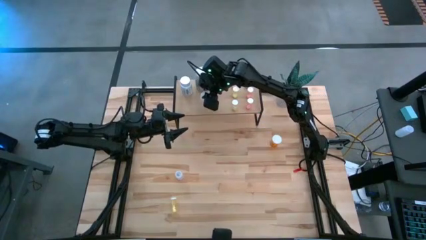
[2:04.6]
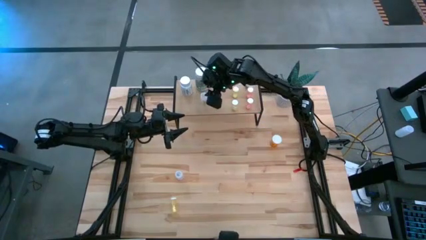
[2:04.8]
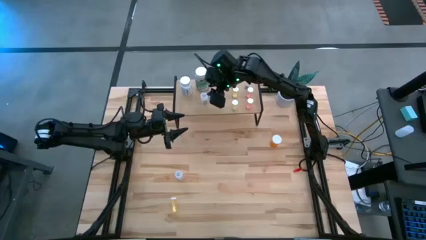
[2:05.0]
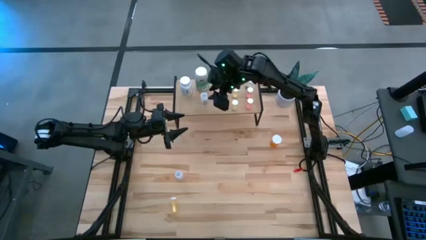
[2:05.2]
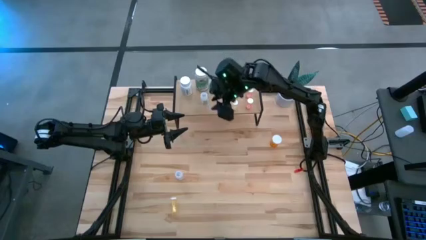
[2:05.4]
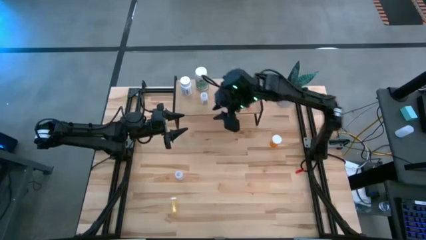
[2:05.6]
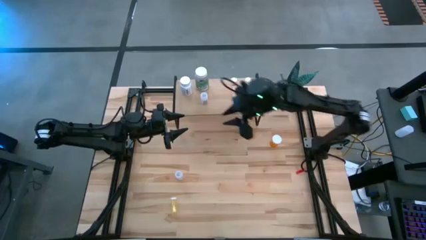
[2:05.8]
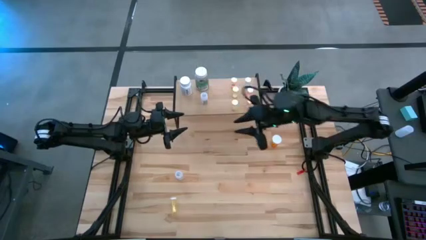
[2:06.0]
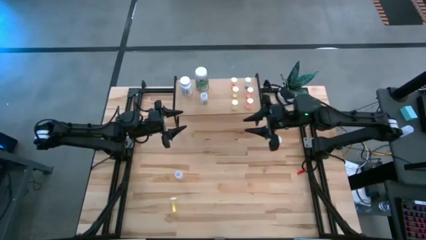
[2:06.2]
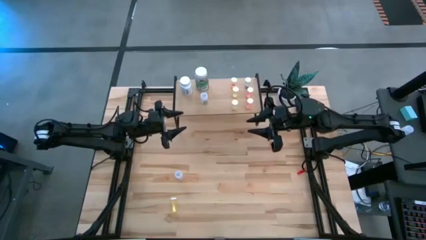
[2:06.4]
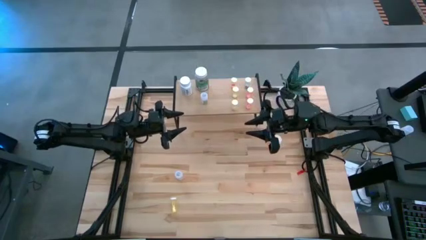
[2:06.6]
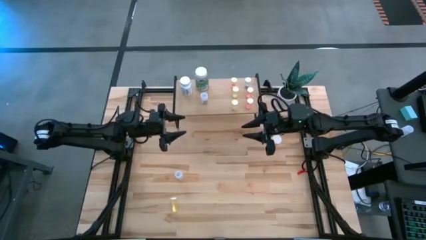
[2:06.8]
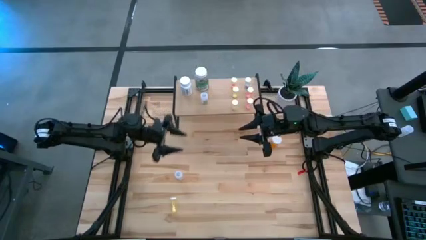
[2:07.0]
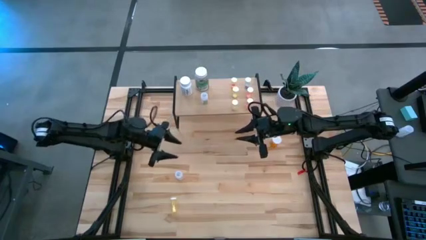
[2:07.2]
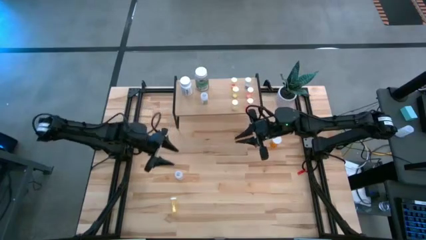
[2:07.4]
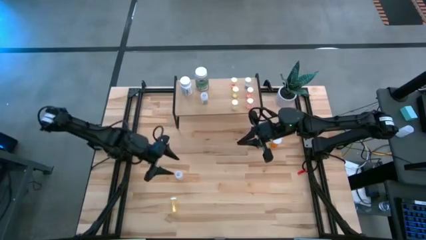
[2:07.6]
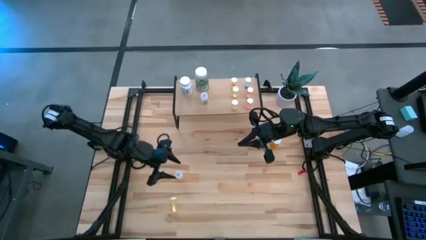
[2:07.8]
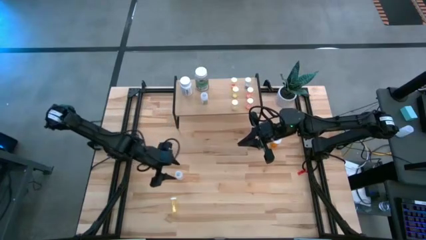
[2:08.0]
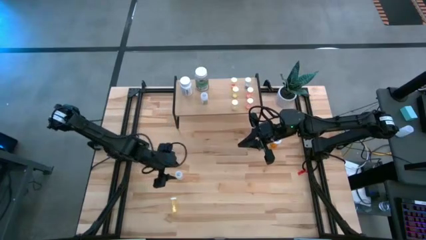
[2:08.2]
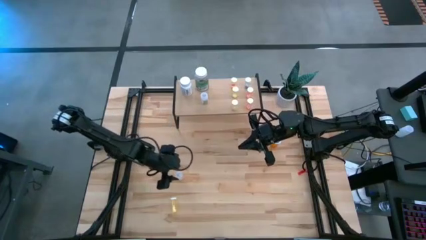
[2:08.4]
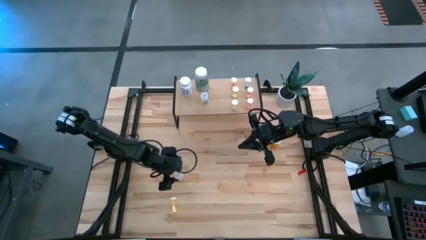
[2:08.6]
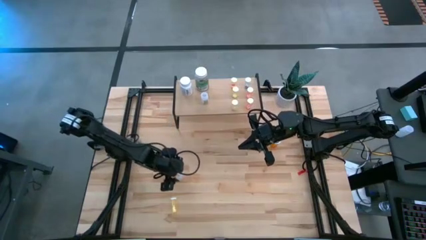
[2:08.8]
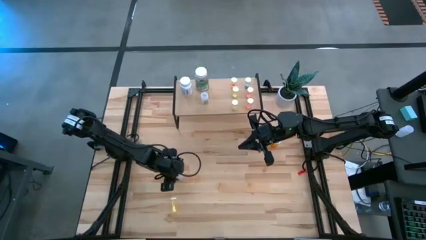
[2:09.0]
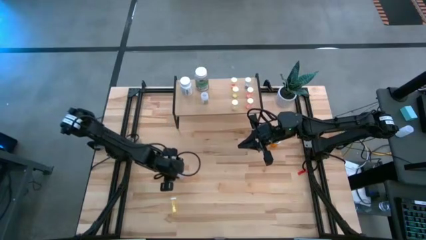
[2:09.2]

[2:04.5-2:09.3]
Task: Pick and place medicine bottles onto shelf by color
Put the transparent pill bottle on the shelf

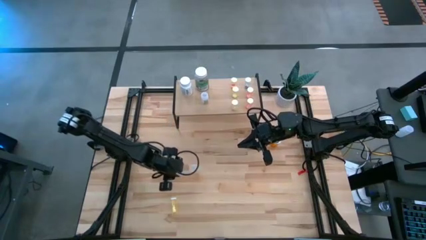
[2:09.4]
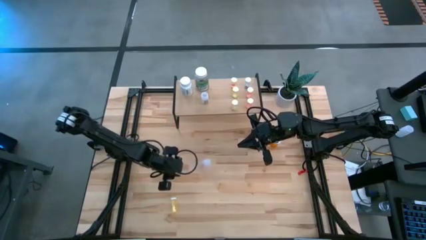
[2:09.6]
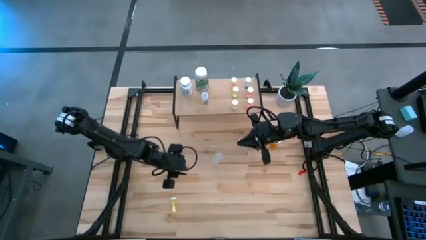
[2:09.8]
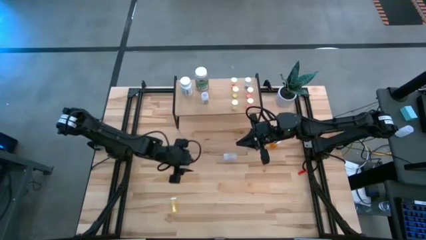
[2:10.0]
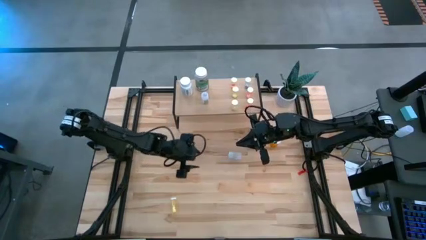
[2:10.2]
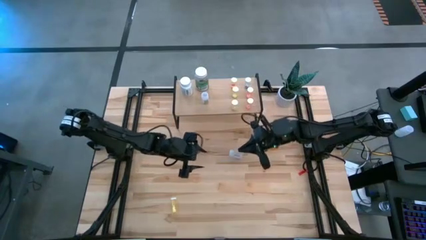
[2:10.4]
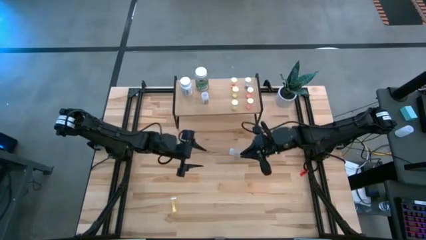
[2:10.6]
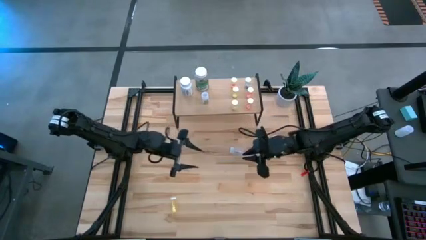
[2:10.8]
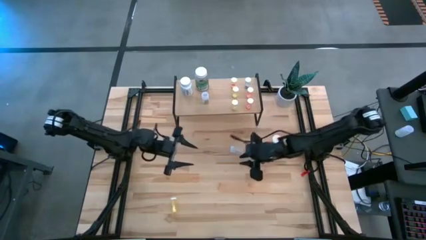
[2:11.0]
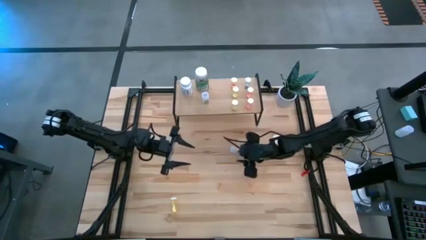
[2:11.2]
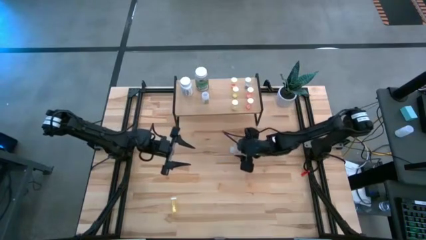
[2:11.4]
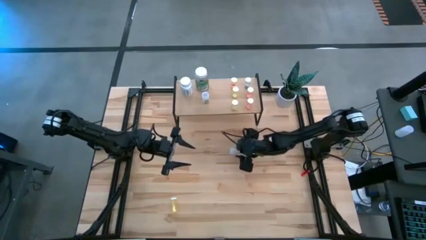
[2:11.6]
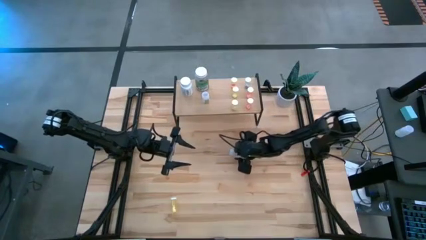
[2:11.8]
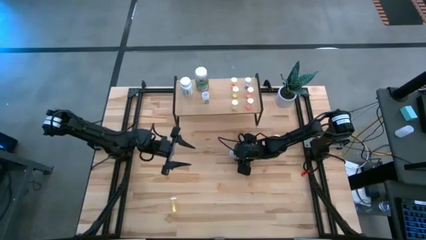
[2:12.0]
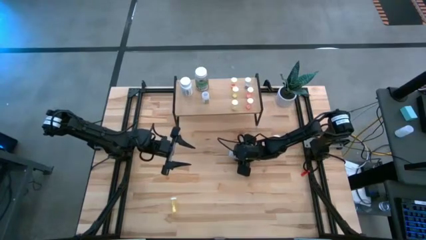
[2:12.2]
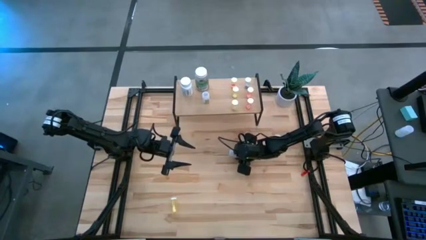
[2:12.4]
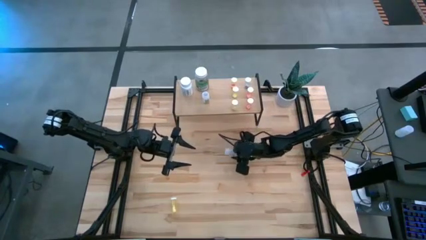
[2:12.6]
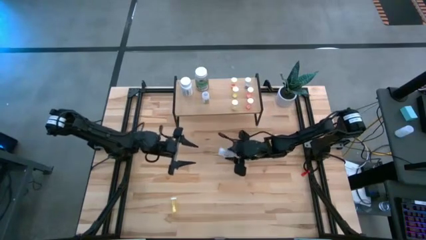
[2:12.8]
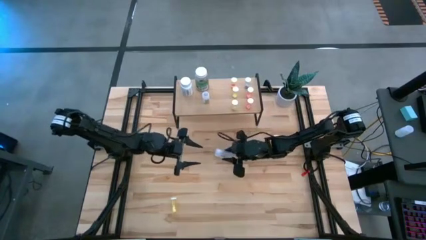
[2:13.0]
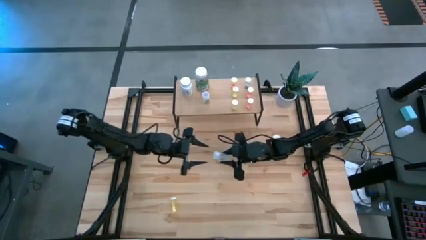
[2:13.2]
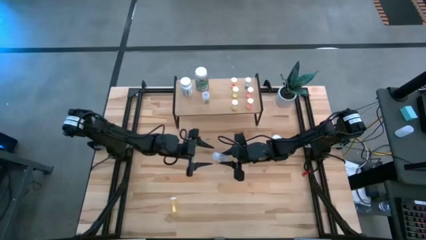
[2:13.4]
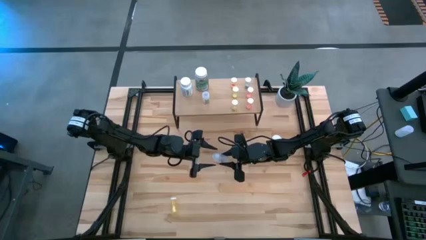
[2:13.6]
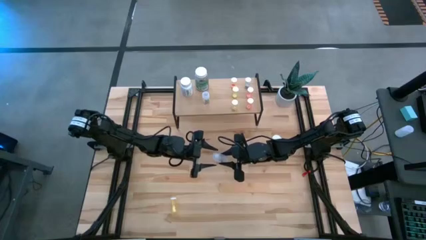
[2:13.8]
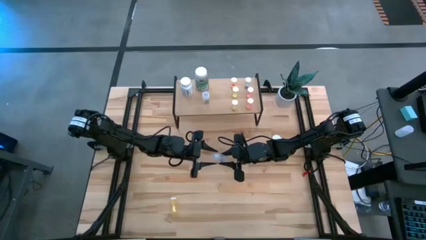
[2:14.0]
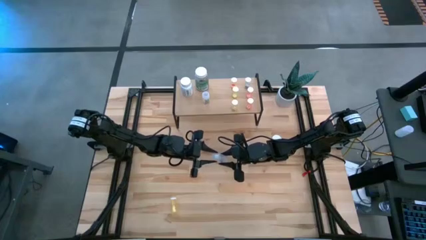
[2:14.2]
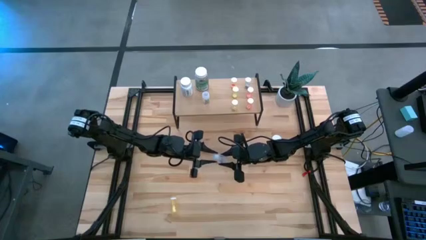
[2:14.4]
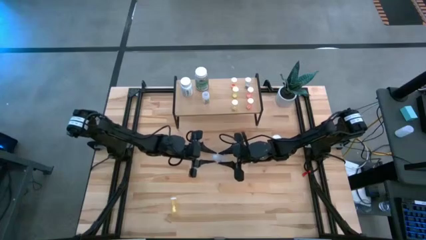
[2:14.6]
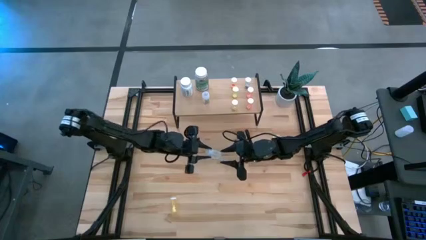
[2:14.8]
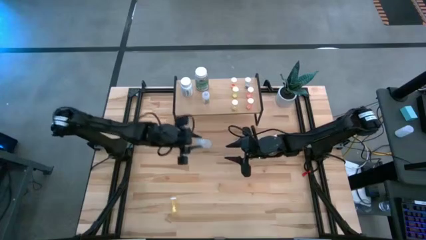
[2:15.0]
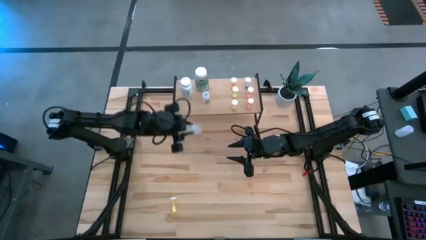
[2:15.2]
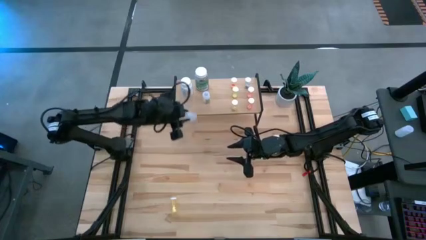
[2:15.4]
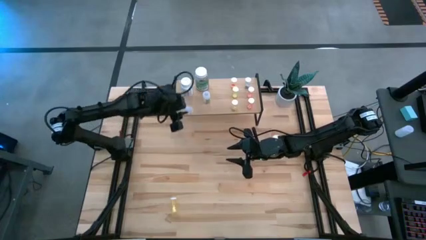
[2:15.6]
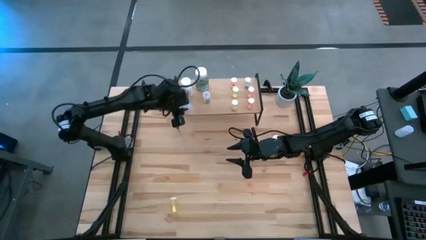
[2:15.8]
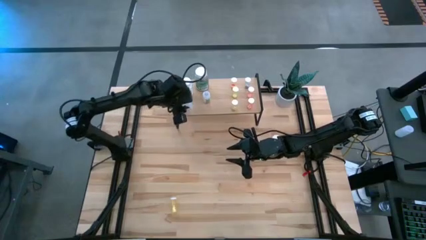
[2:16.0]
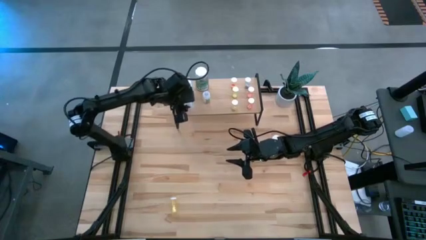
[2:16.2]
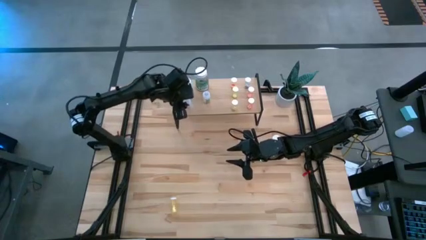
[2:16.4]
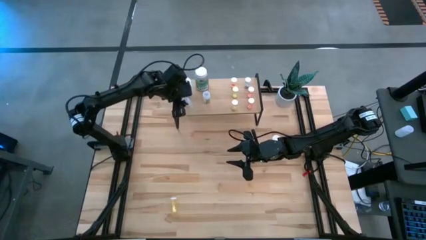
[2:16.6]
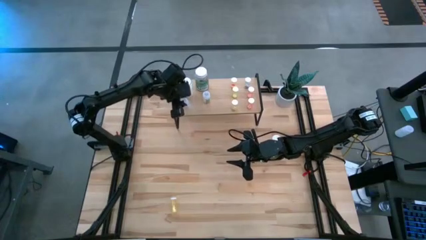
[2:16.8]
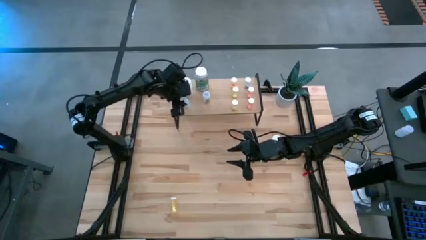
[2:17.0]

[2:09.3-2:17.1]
Put the transparent pill bottle on the shelf
